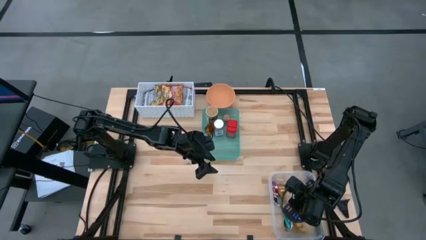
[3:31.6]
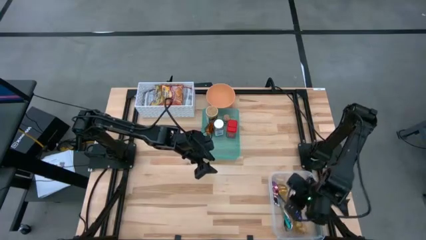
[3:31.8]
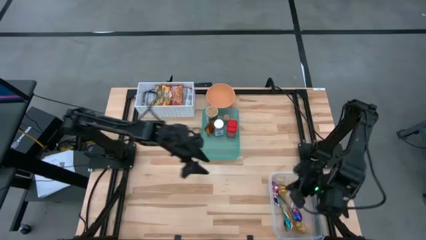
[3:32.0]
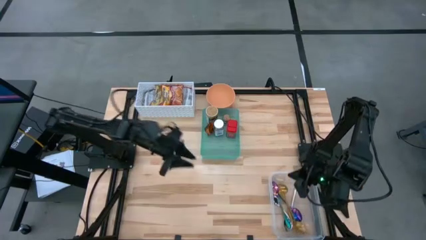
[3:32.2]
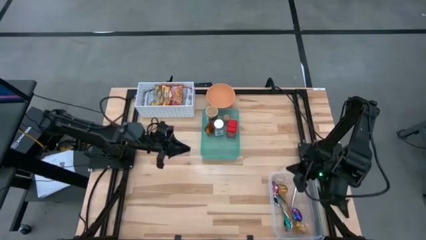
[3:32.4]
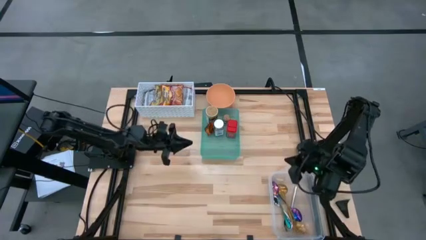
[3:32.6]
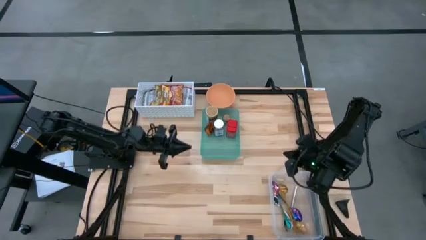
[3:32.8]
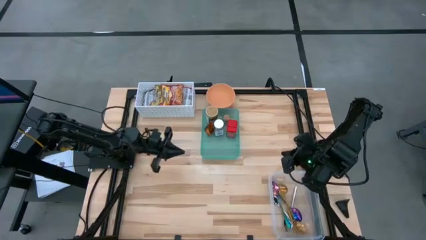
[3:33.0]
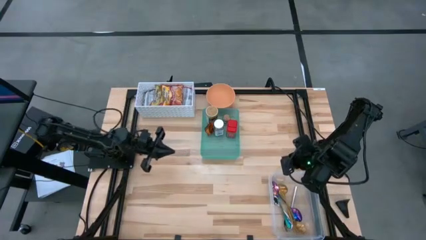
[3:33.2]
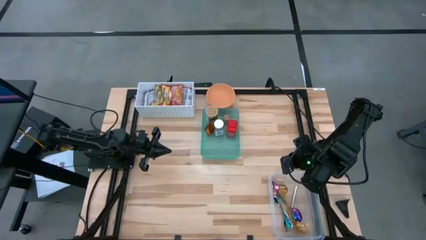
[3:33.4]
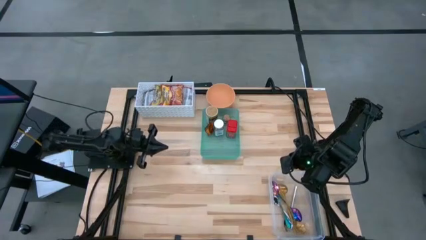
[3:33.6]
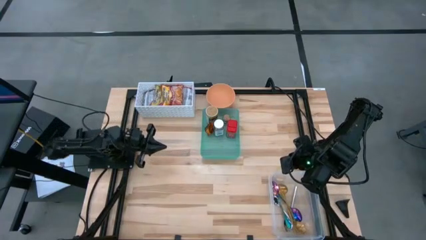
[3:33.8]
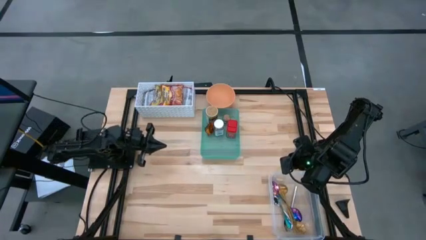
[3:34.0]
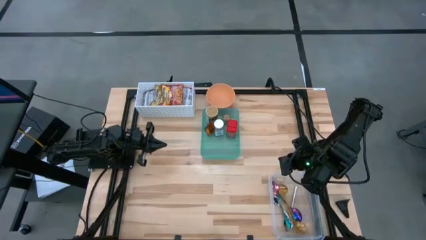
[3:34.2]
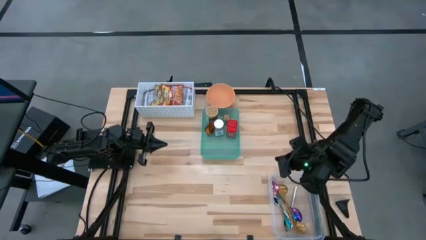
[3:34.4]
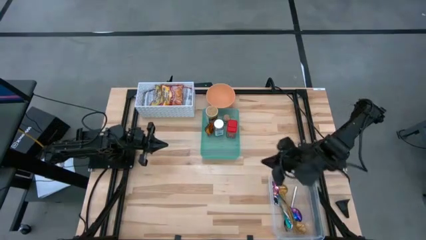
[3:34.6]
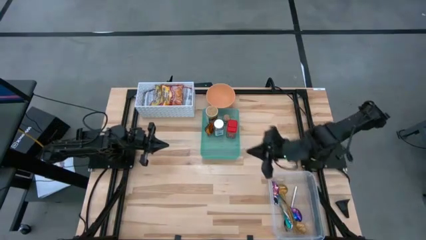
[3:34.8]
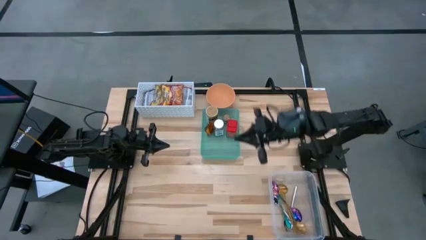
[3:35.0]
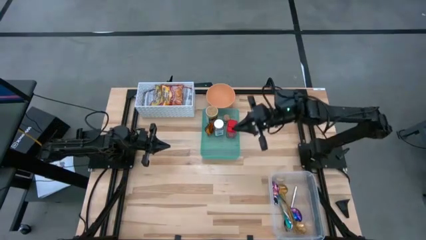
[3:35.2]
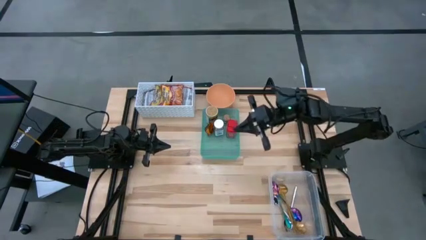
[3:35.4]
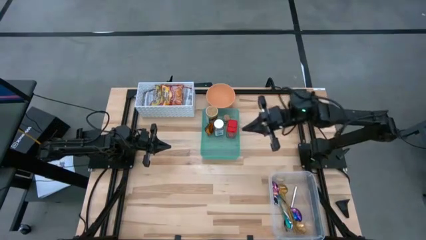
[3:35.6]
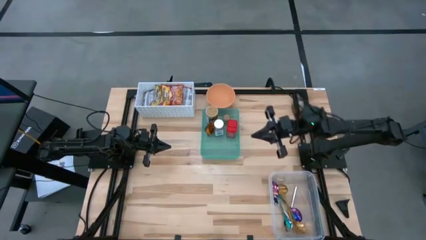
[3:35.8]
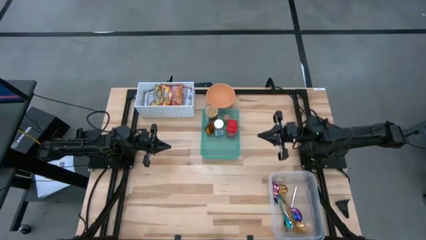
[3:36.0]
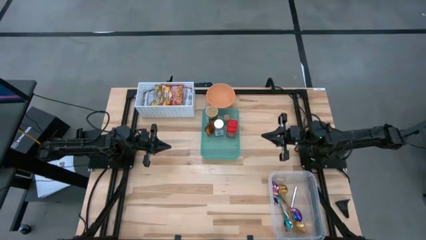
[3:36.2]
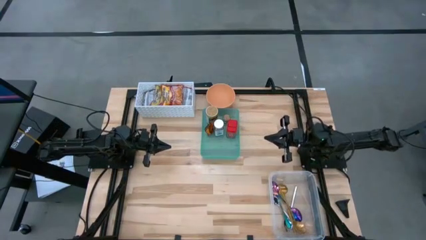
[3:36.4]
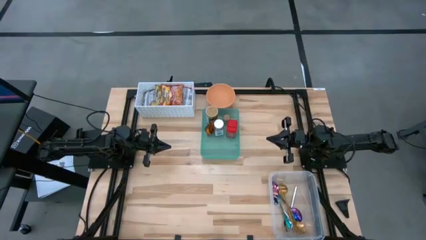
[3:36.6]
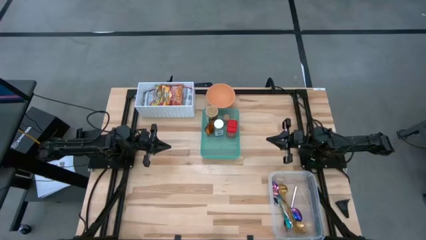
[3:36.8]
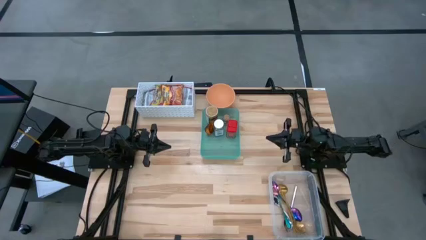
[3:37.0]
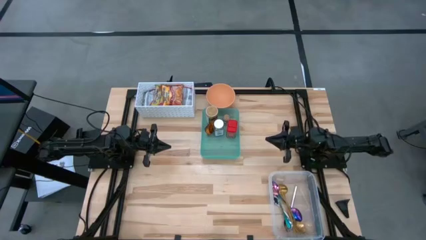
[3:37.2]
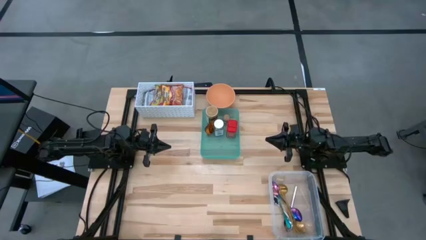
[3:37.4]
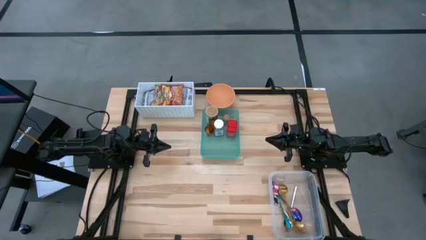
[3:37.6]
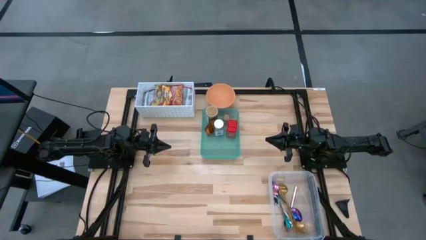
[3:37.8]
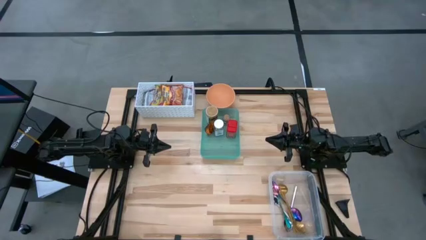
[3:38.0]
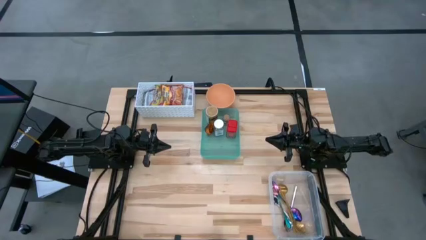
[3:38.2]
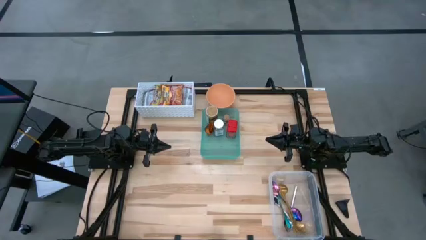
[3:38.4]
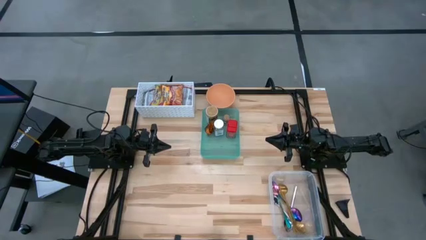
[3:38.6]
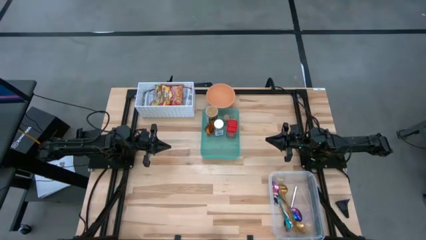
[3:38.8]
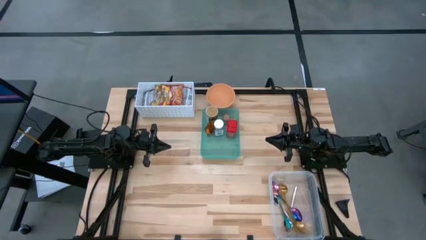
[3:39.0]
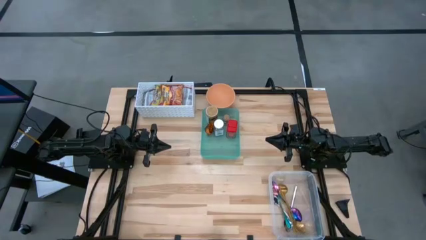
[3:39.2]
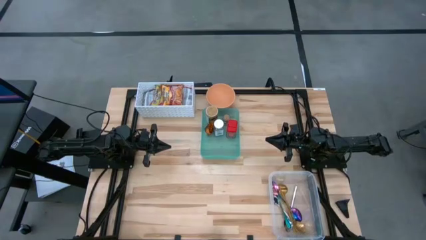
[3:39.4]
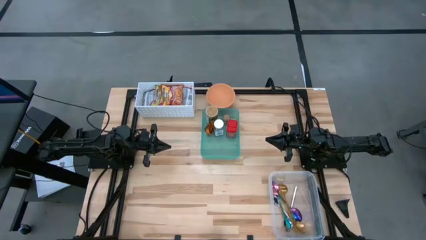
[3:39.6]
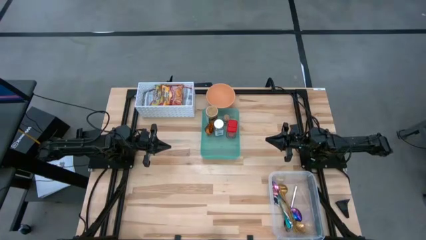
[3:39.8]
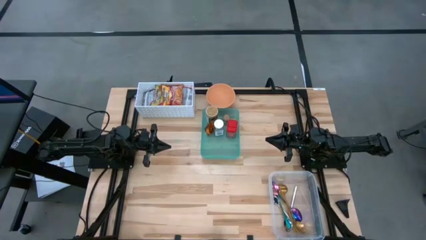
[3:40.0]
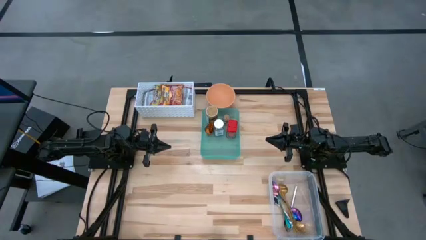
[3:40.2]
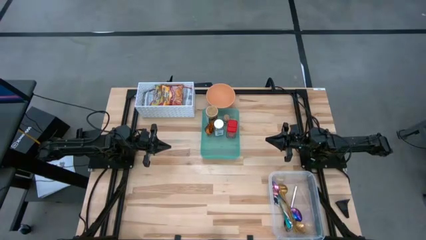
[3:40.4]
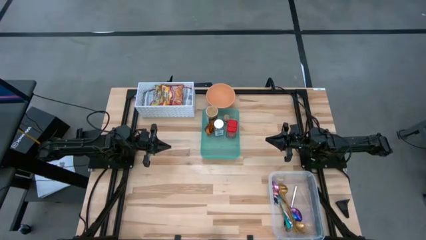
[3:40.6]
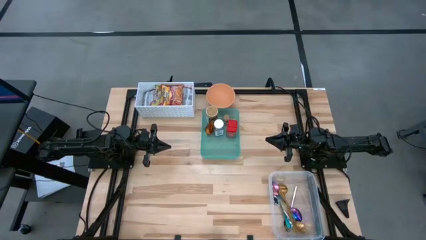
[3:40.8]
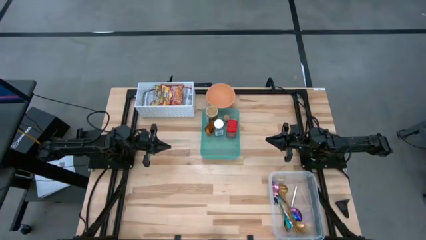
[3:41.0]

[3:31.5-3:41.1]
Task: Pick & Place Food Item
Return to Home Position

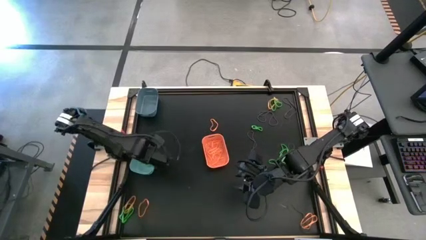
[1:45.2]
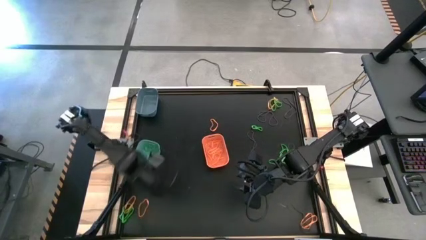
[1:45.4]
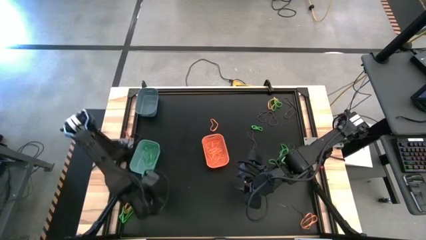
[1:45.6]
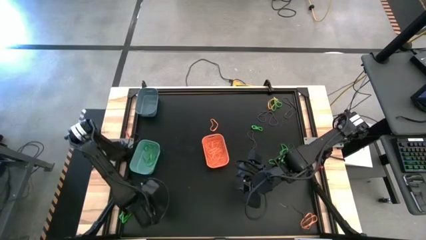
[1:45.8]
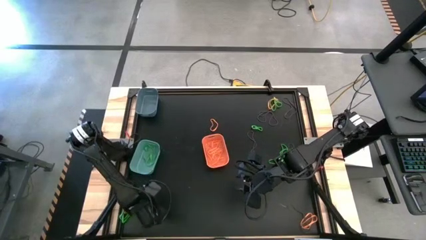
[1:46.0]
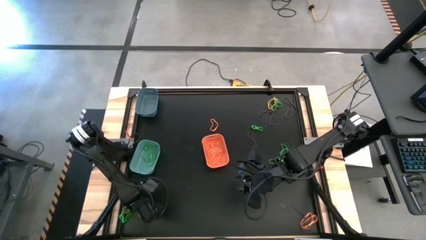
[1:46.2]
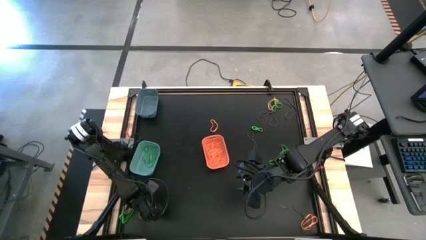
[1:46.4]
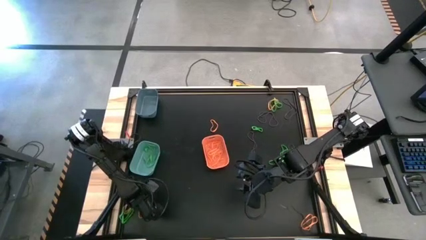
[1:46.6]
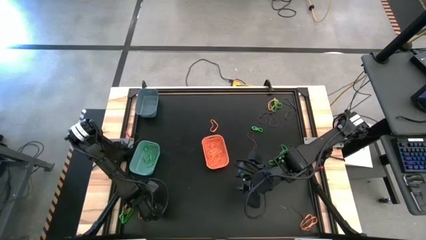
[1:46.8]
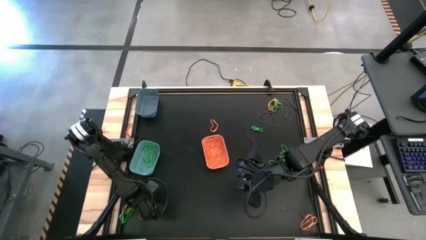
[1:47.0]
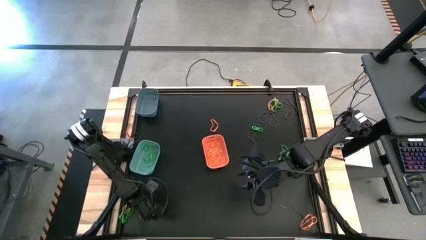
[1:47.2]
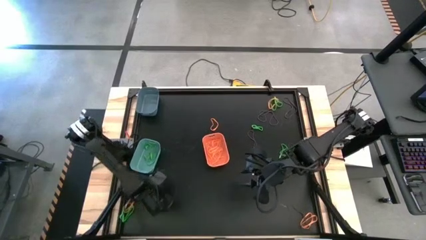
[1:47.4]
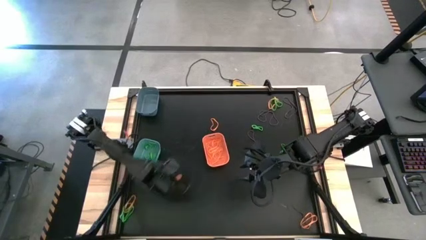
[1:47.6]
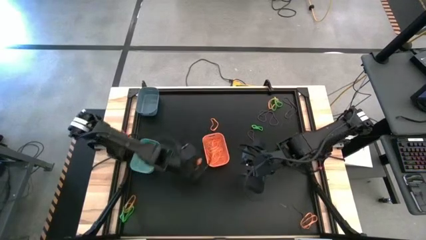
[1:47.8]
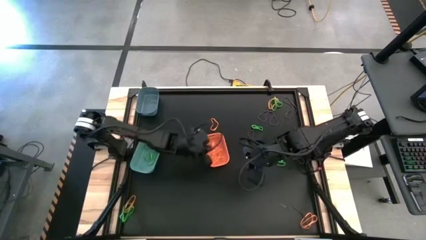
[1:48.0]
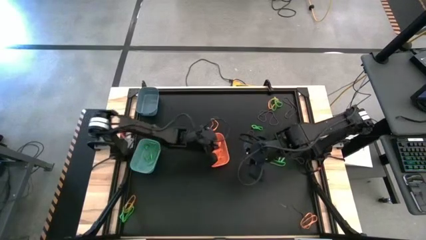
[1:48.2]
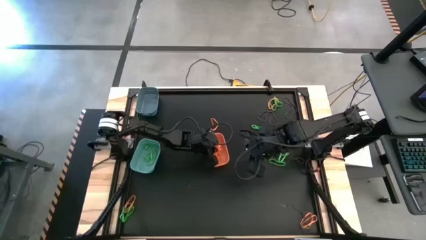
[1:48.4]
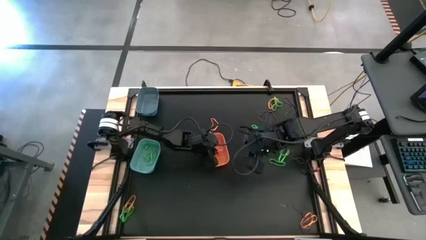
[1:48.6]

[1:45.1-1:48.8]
Task: Sort rubber bands into baskets
Put the orange rubber band into the orange bin

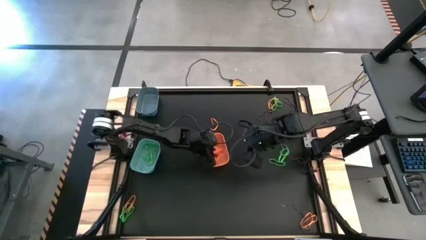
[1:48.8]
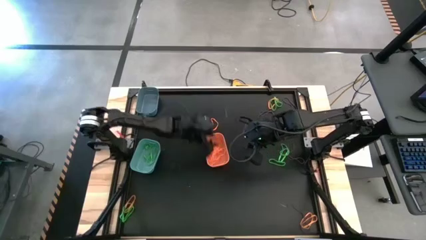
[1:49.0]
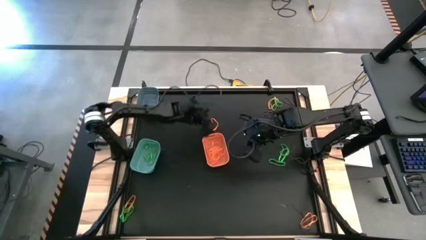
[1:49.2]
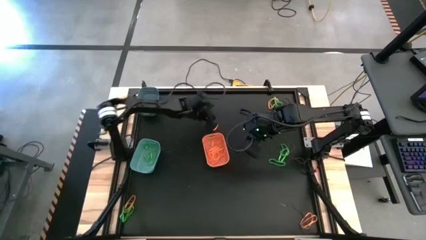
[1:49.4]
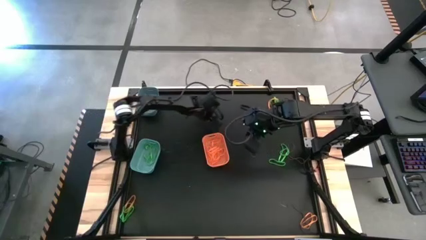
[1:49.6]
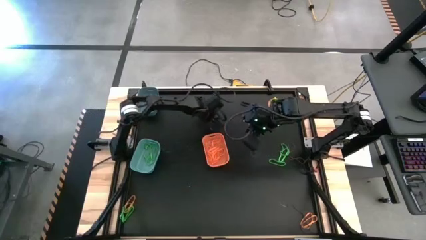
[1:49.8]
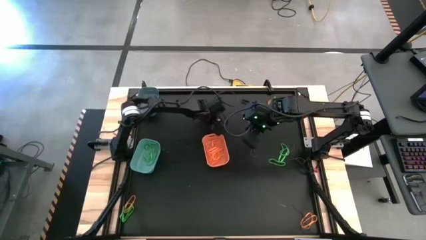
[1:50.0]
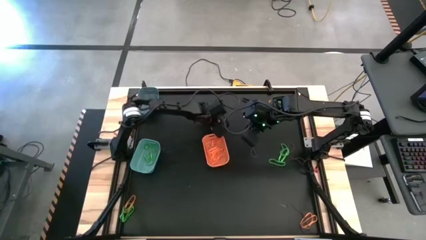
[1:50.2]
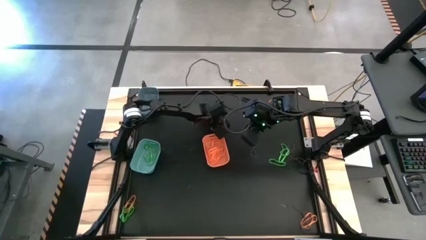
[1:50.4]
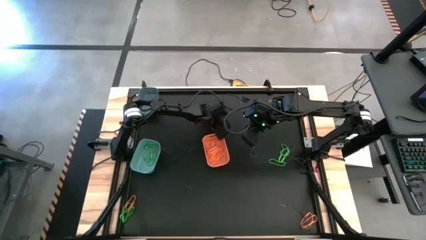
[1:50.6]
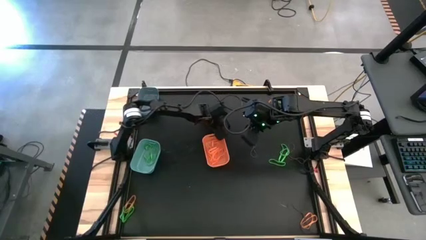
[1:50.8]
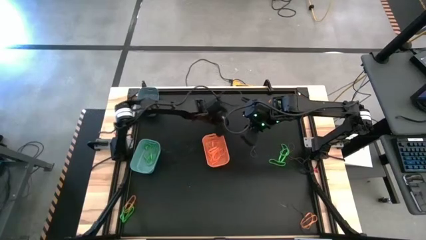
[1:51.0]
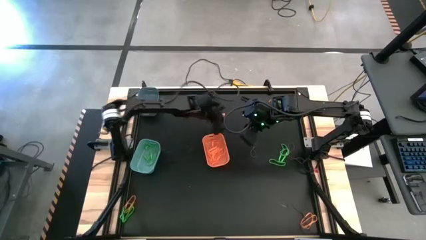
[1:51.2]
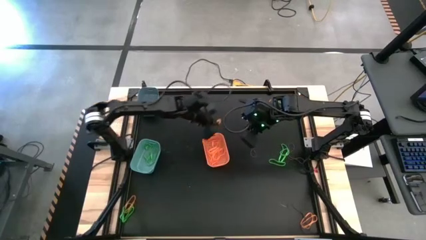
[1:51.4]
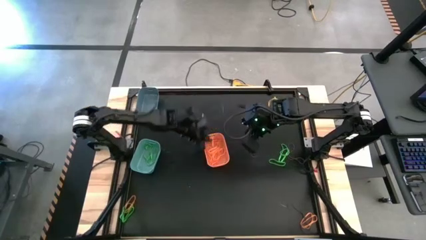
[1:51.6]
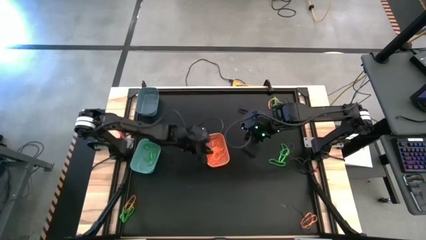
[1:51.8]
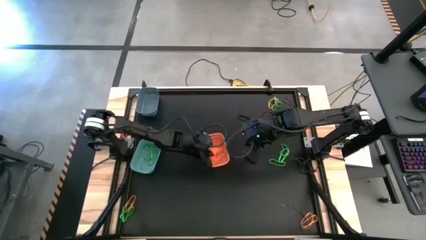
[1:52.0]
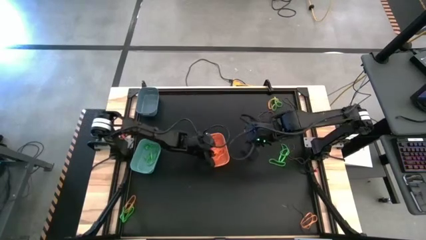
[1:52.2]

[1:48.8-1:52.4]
Put the orange rubber band into the orange bin

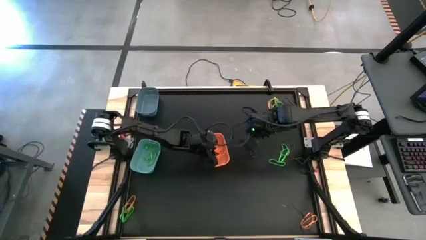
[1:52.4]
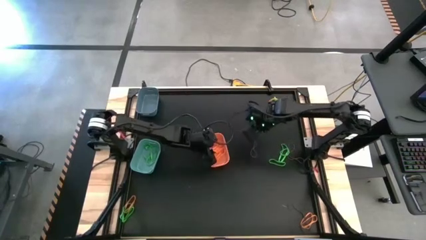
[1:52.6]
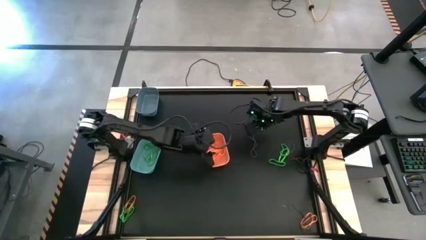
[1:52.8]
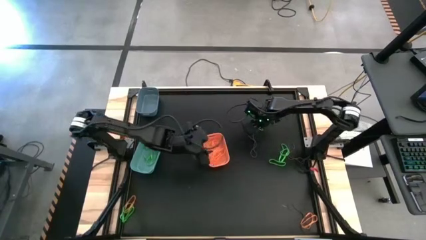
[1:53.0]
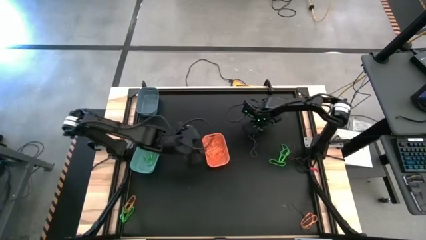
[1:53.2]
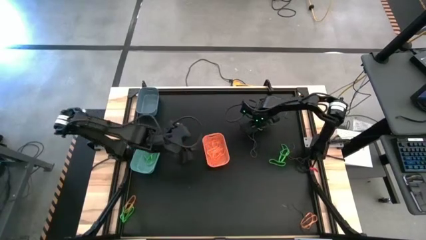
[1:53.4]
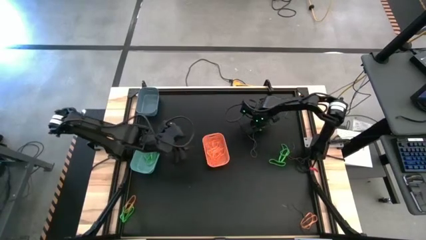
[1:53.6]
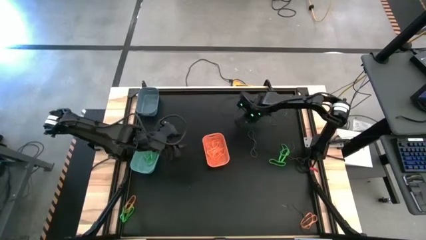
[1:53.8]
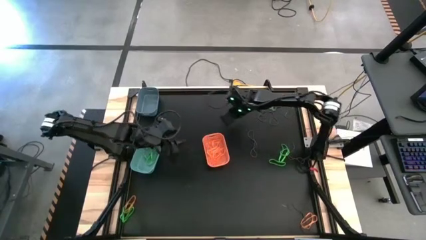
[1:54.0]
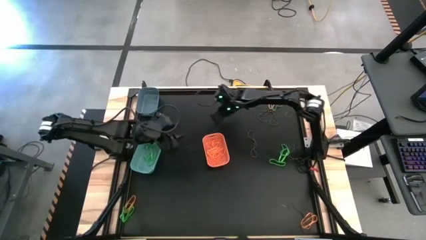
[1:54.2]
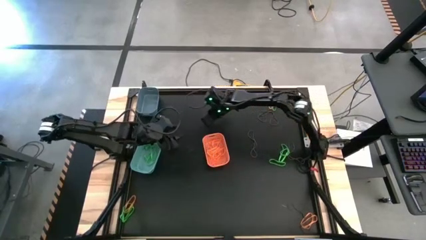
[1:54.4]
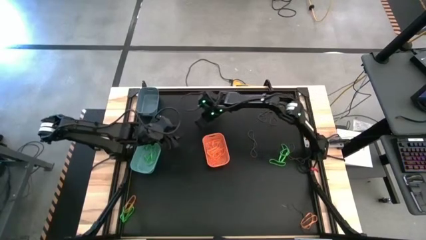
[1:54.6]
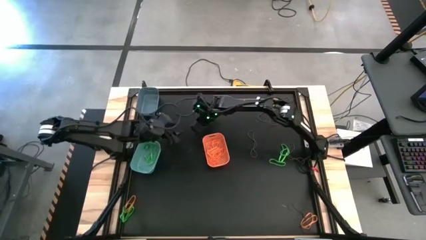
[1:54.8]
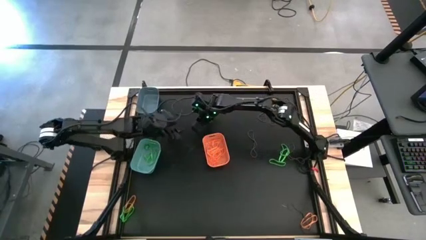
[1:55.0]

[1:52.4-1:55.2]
Move the green rubber band
